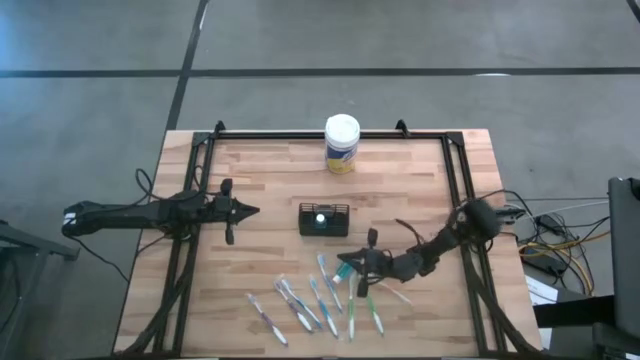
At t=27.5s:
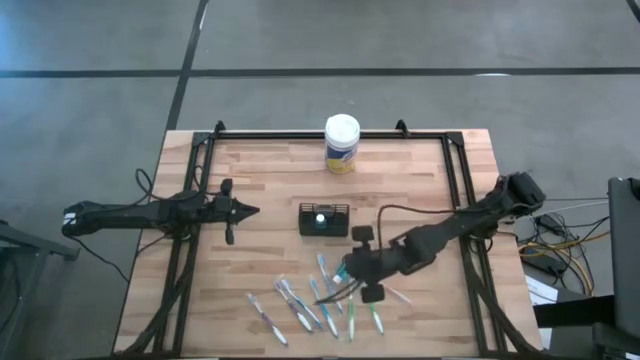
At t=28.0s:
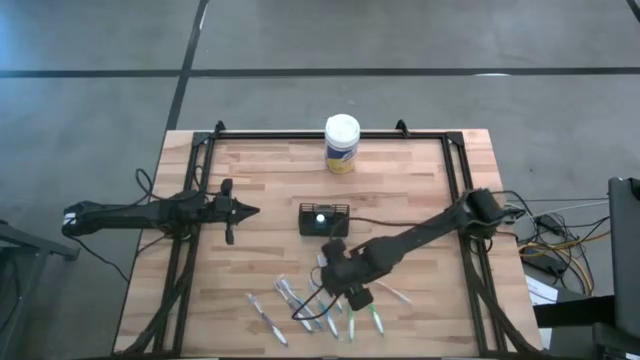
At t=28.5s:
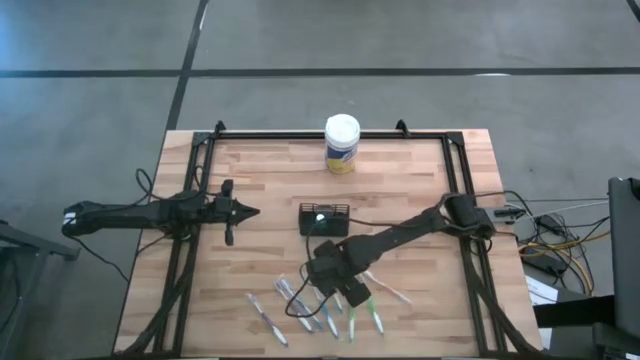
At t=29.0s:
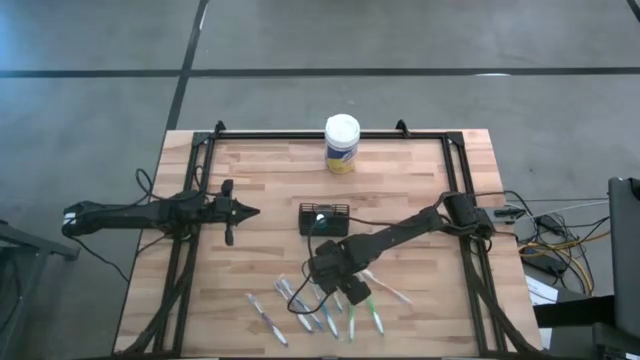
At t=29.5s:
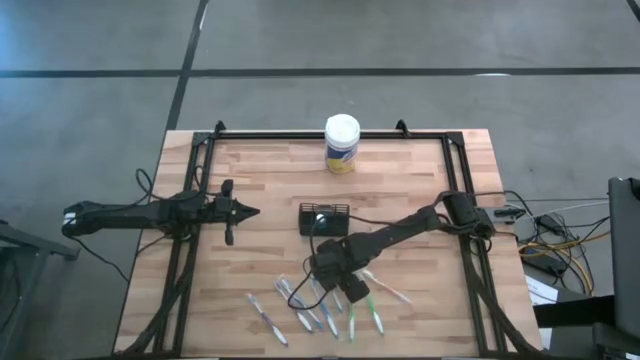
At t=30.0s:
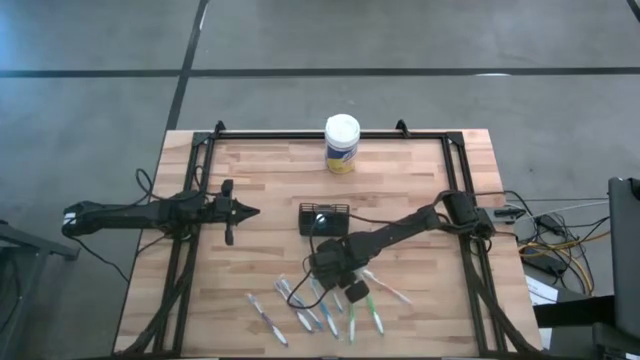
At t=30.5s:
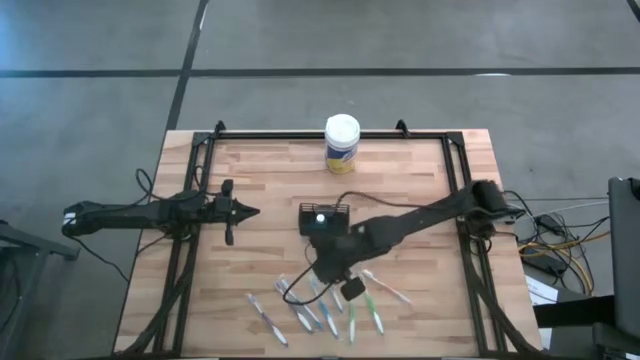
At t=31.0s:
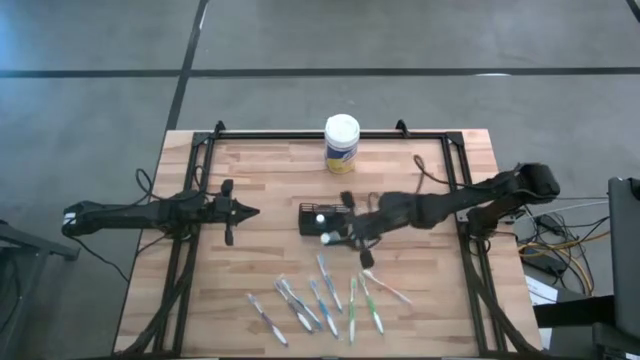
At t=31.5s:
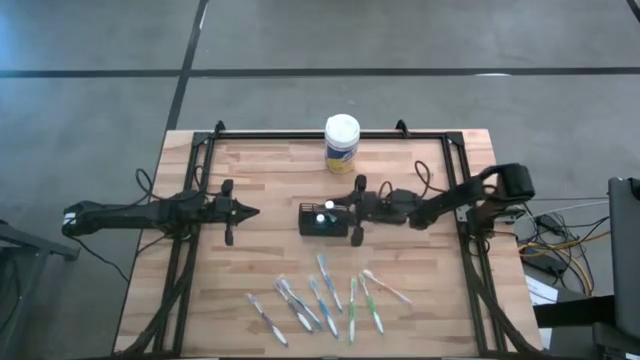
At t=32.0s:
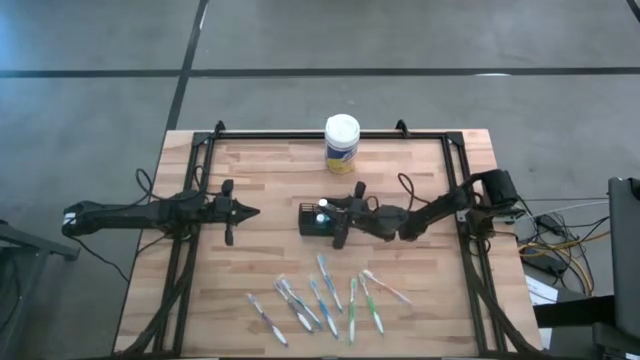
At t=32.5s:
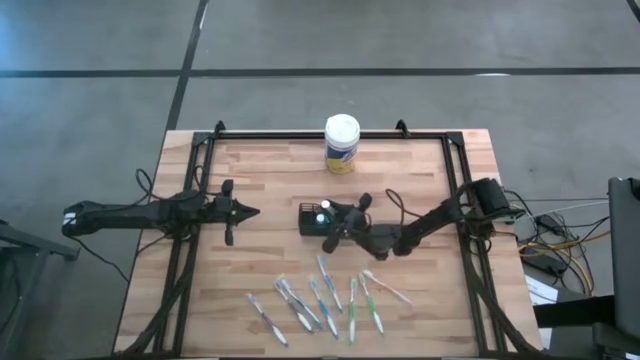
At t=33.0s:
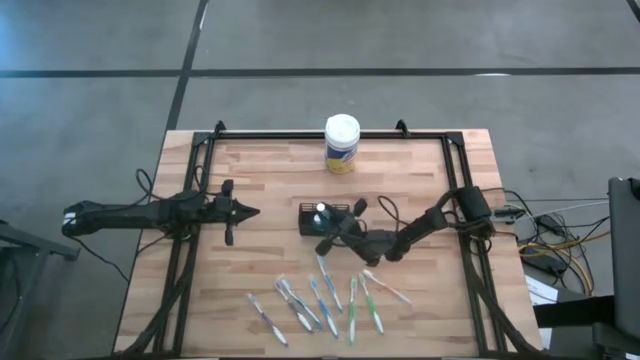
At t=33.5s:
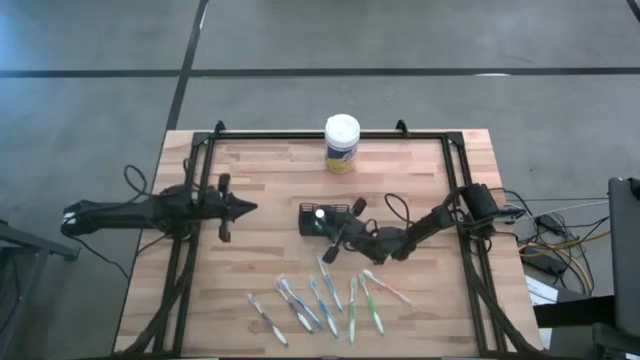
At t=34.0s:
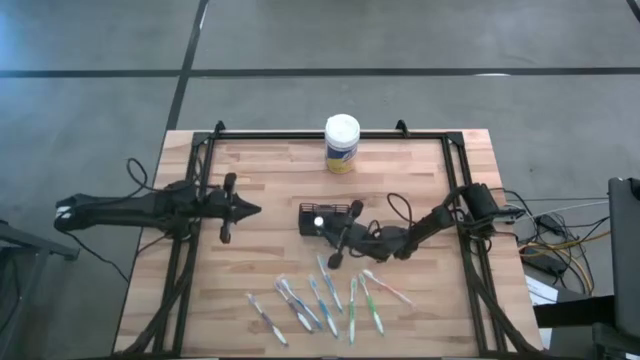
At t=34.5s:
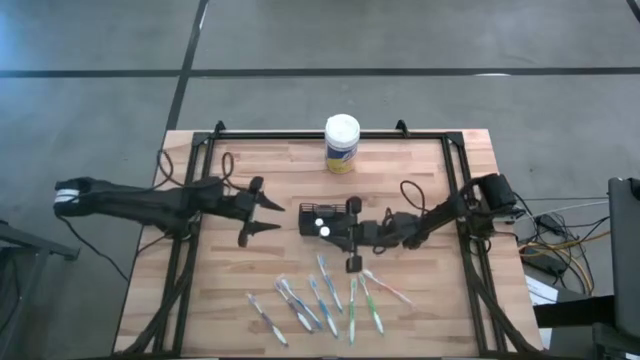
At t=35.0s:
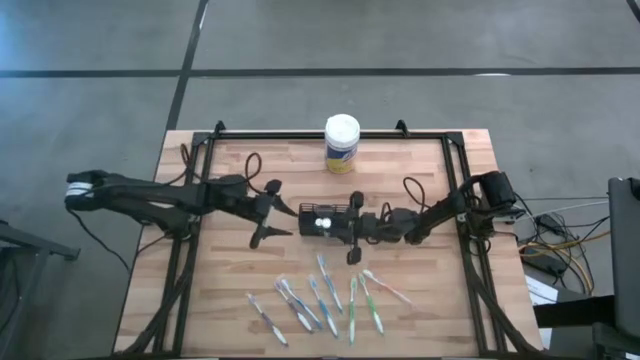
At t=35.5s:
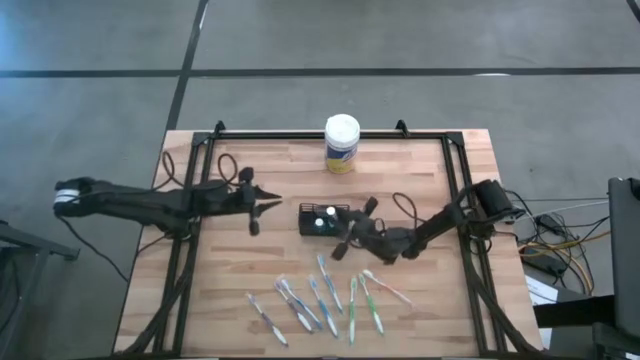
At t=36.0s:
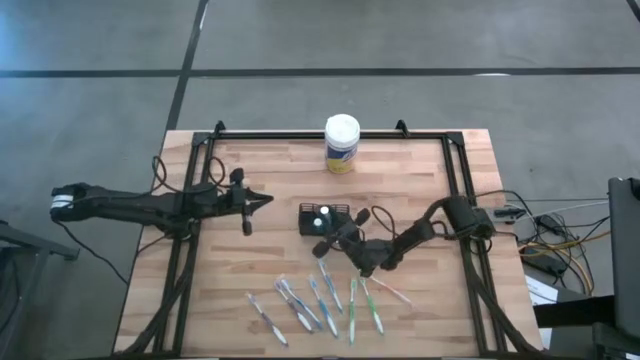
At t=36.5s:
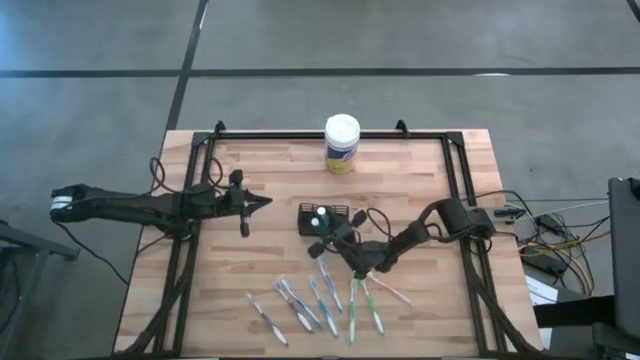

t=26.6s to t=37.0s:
Task: Pick & Place toothbrushing station
Put the mouthwash into the wire organizer

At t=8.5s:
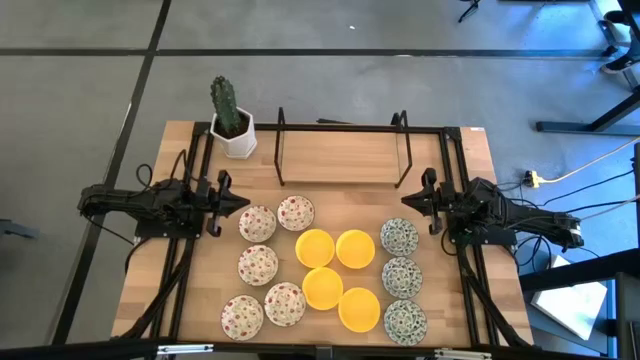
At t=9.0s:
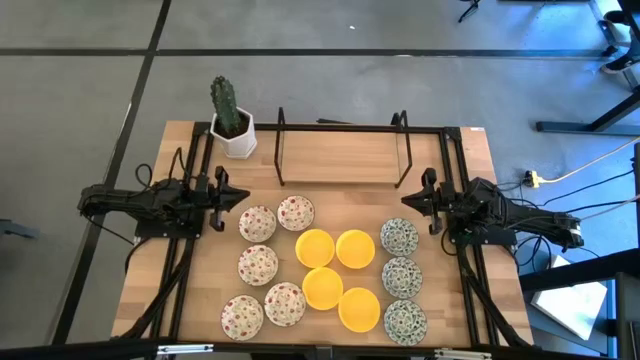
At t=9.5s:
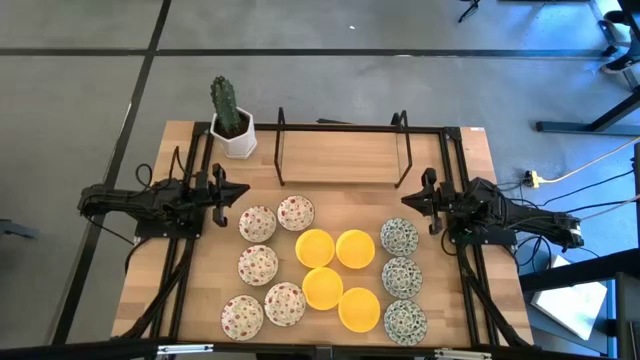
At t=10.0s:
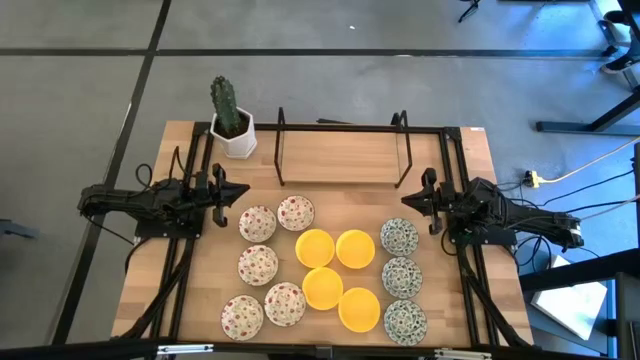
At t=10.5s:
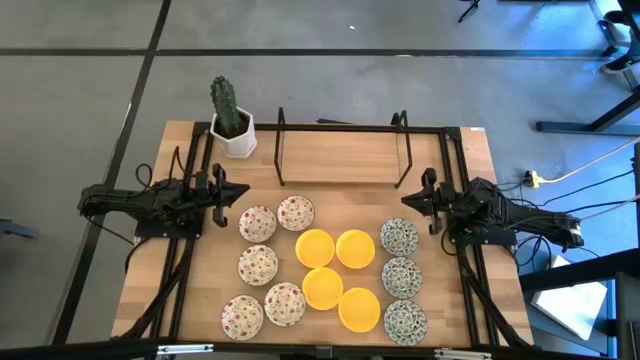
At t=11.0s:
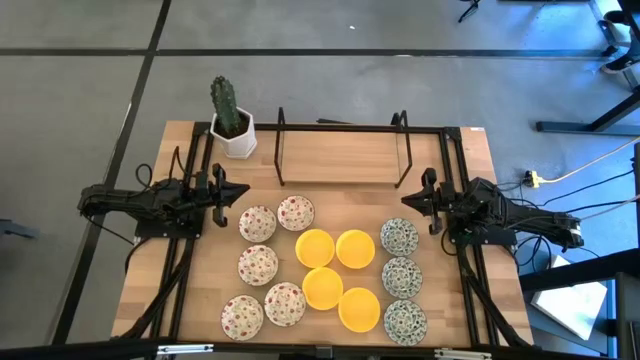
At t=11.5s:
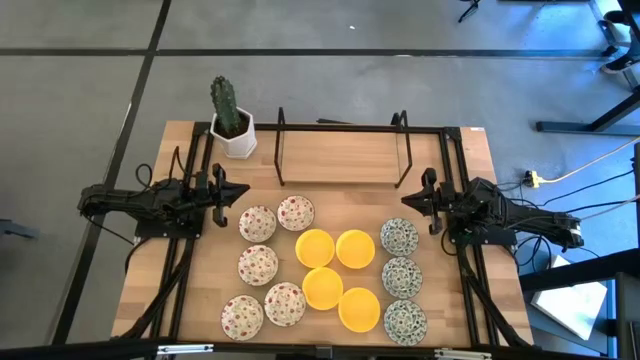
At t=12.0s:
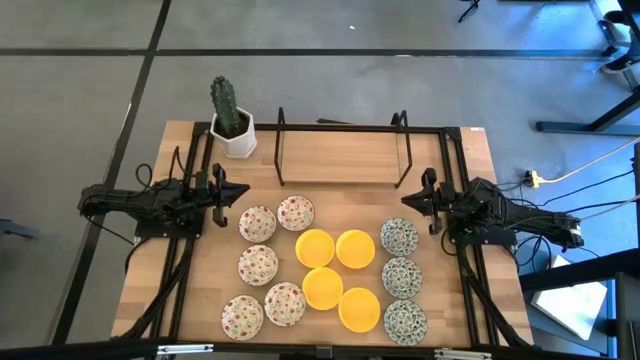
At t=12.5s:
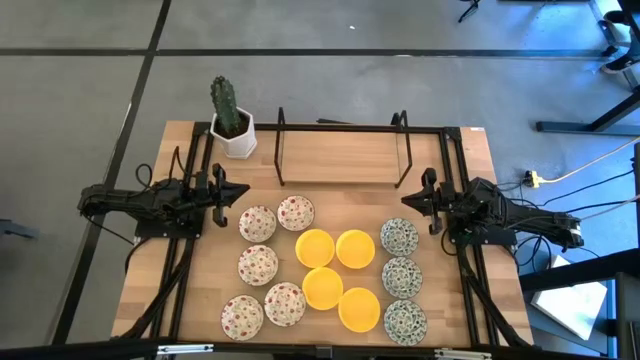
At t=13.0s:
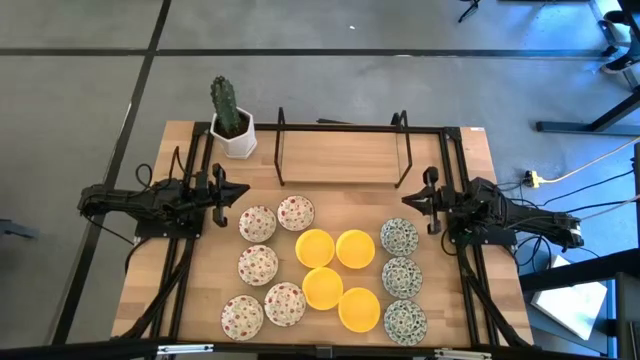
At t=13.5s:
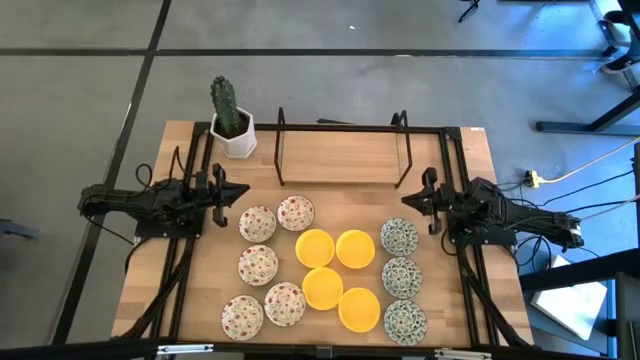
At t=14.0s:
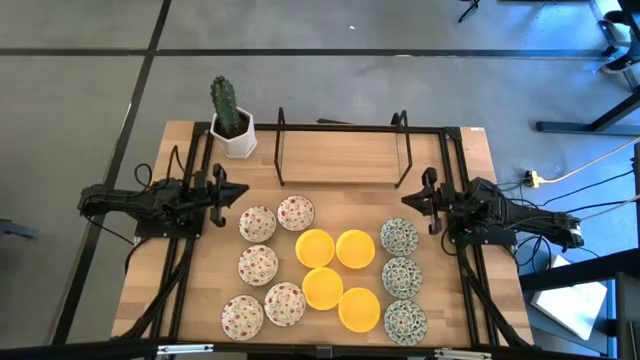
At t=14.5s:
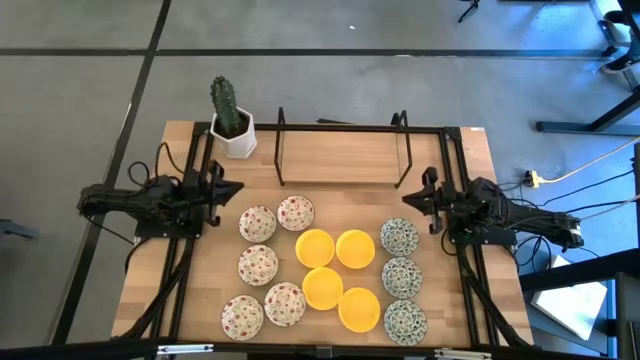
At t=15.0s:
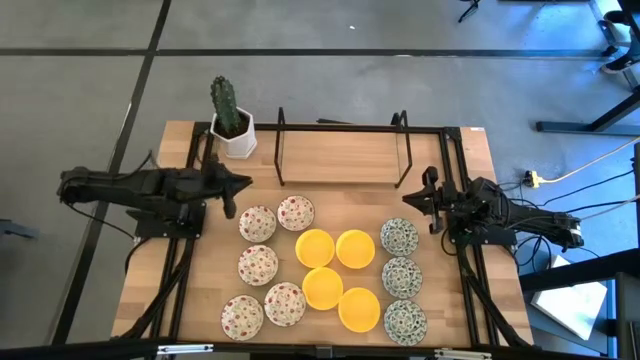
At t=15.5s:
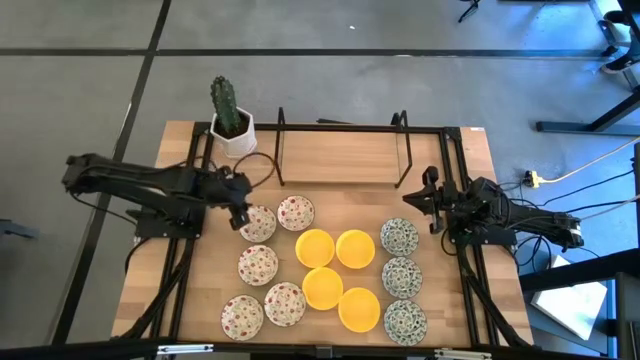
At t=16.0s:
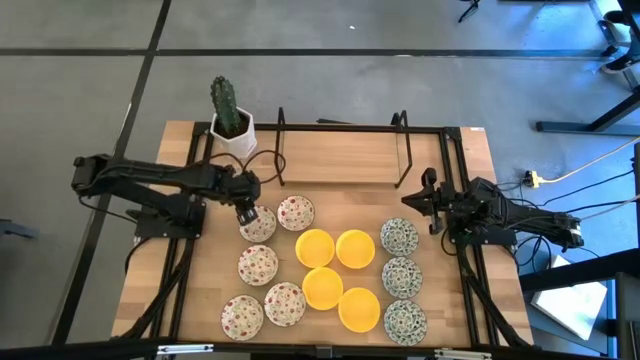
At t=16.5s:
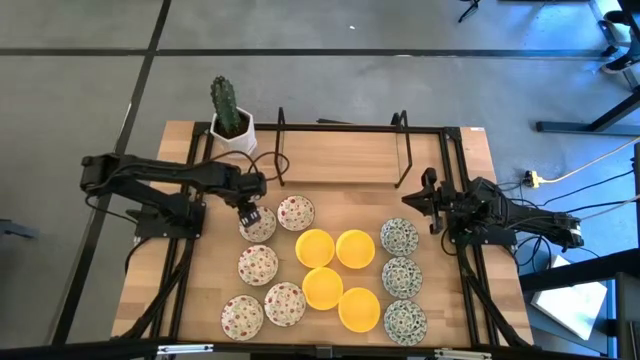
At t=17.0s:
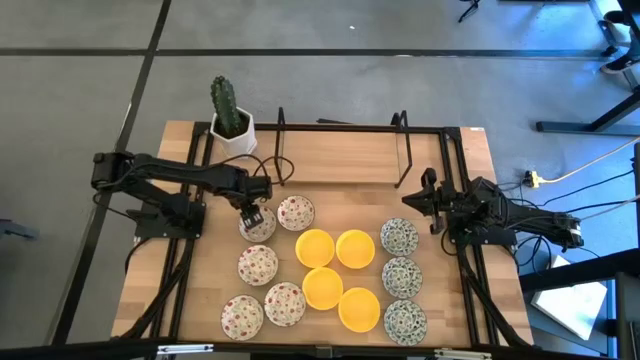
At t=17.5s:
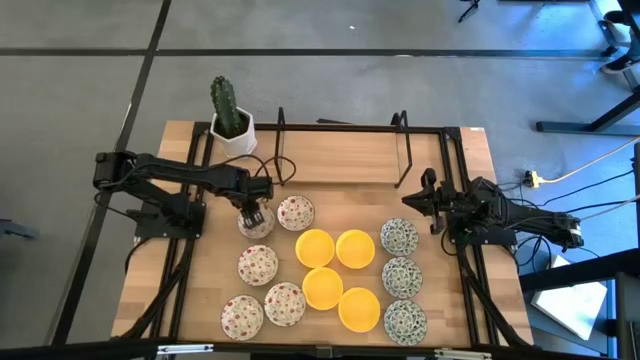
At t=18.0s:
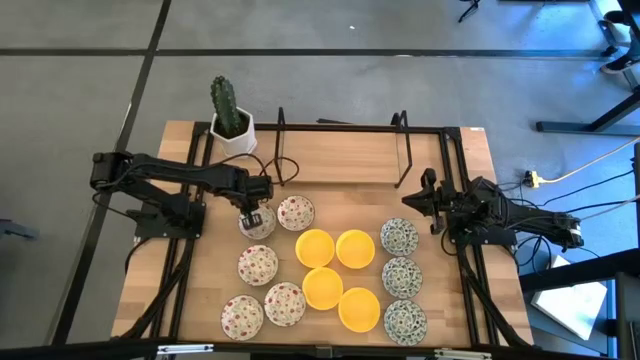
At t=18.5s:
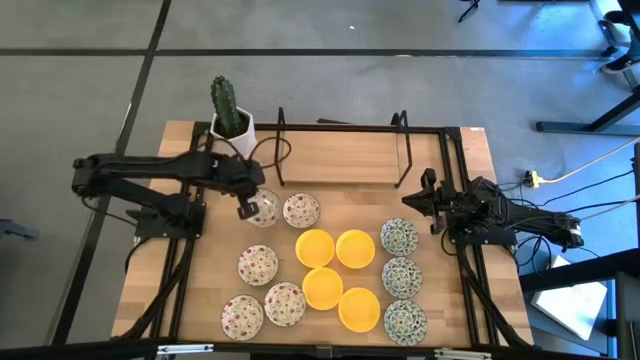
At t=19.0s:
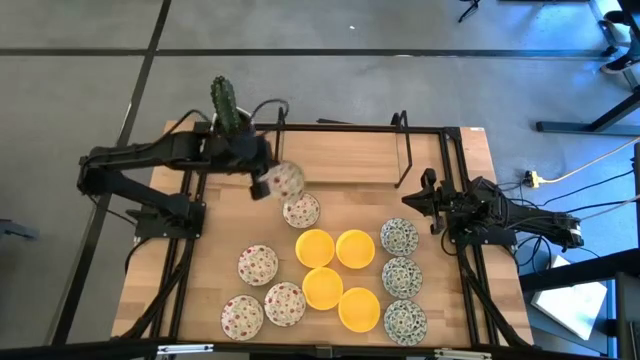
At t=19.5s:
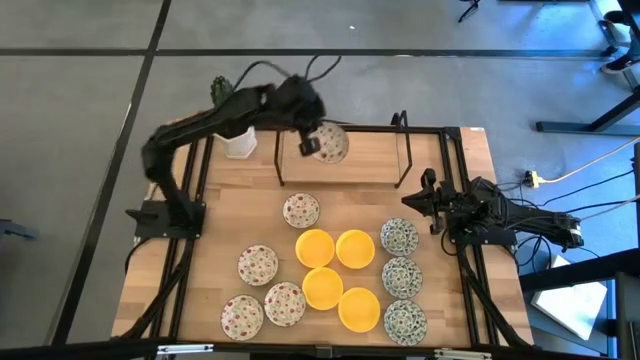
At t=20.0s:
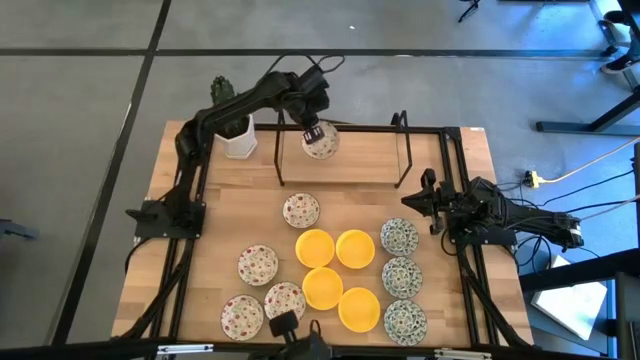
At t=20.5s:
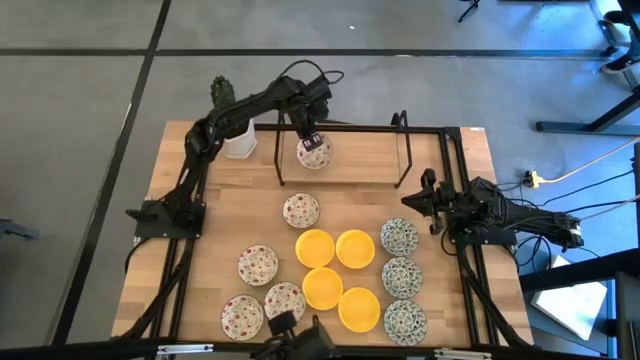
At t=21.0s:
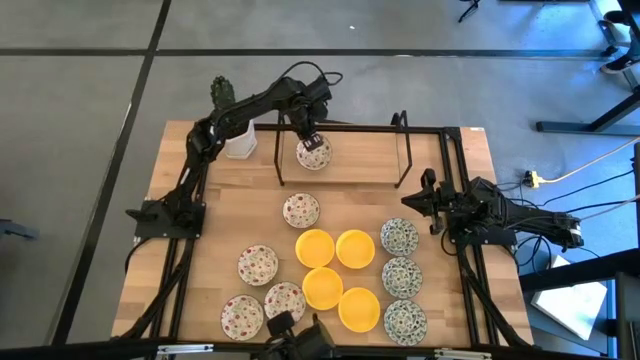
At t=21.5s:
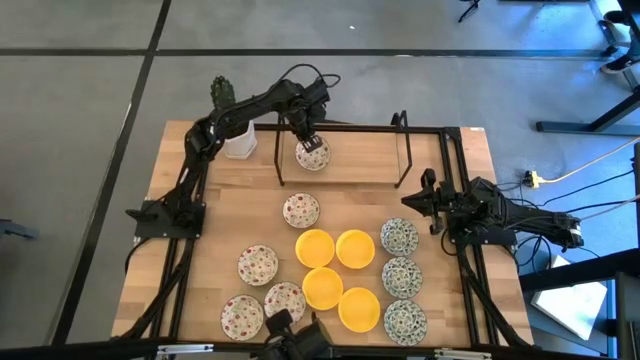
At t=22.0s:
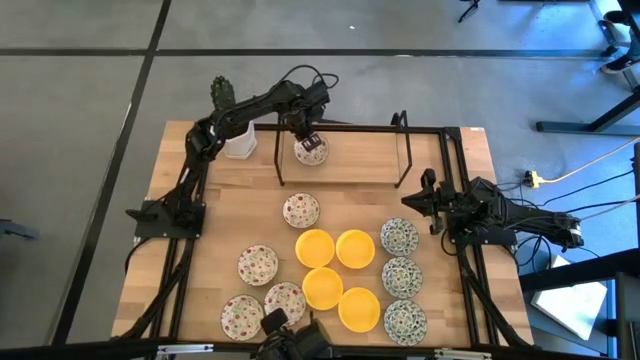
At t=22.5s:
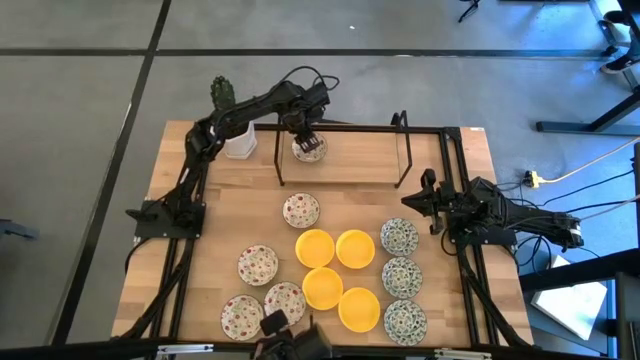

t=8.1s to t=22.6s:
Task: Pick & Place Mini bowls
Put the white red patterned bowl on the shelf
